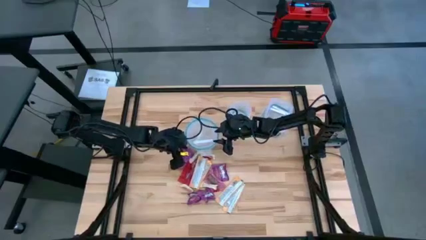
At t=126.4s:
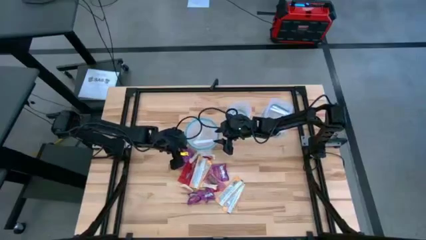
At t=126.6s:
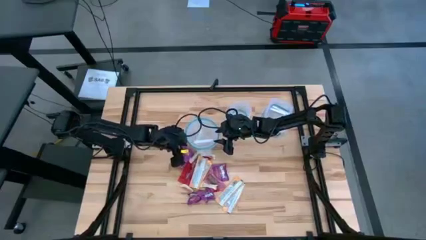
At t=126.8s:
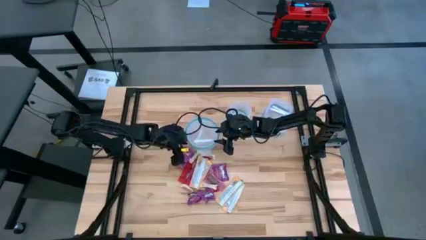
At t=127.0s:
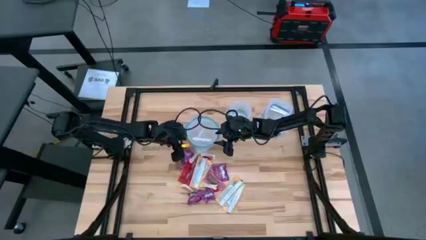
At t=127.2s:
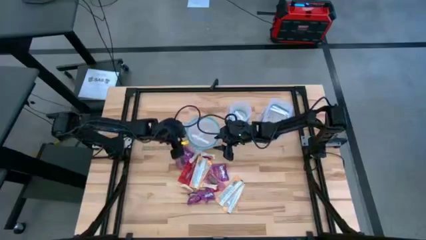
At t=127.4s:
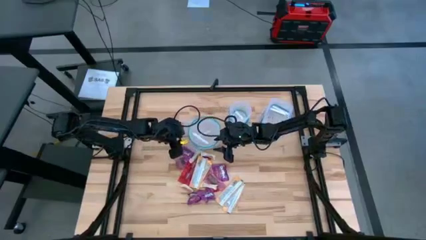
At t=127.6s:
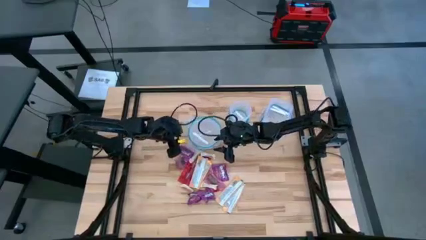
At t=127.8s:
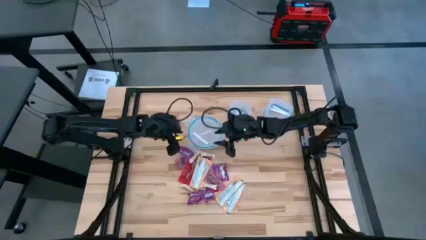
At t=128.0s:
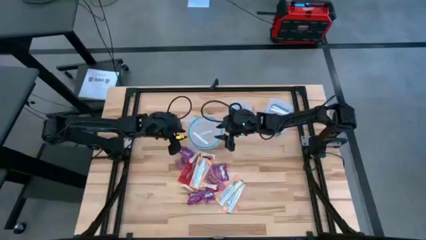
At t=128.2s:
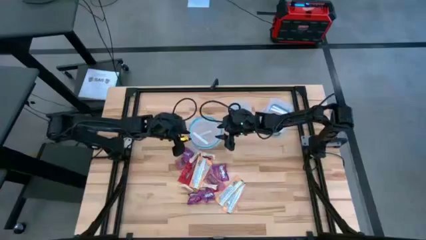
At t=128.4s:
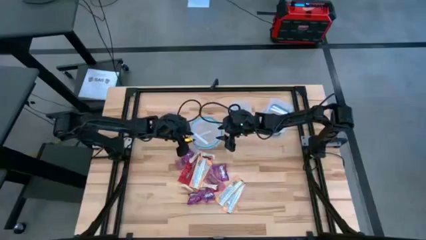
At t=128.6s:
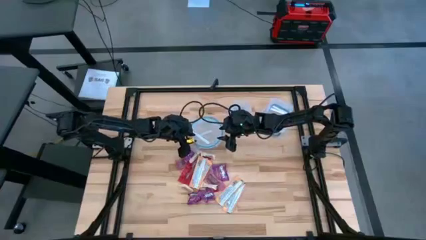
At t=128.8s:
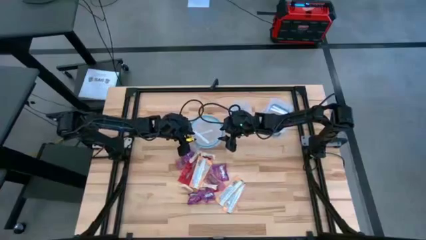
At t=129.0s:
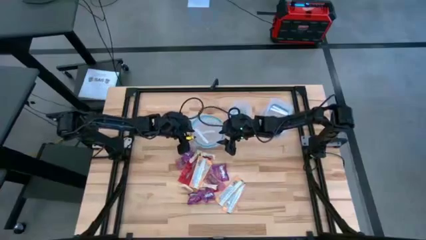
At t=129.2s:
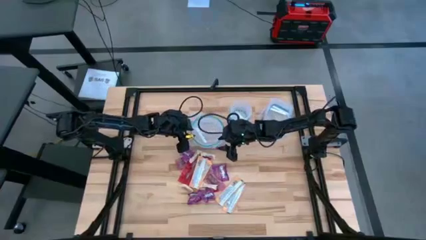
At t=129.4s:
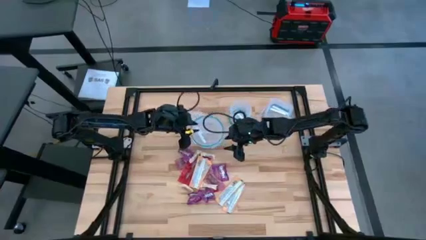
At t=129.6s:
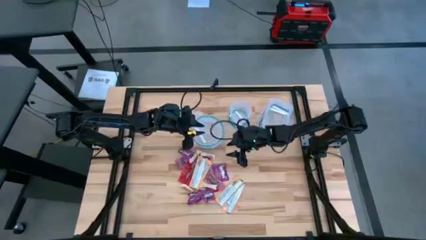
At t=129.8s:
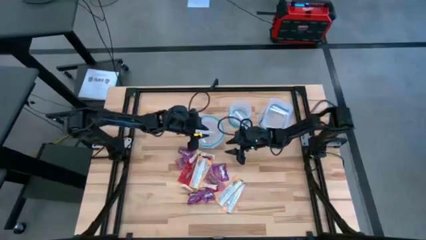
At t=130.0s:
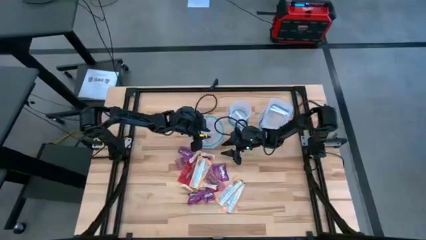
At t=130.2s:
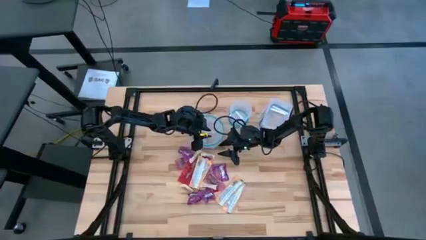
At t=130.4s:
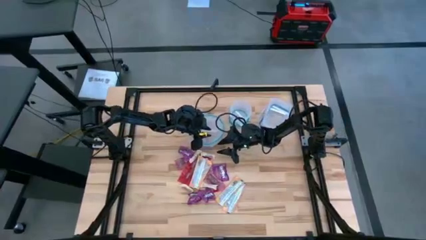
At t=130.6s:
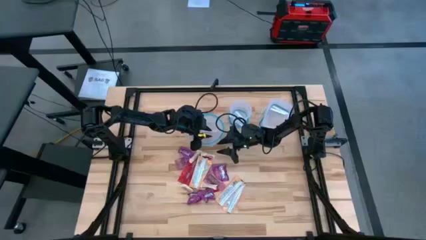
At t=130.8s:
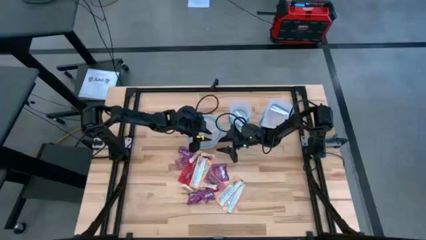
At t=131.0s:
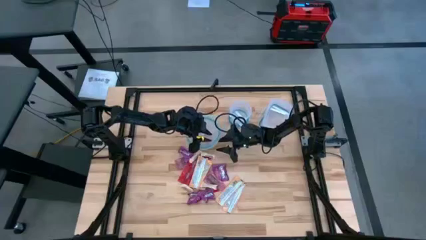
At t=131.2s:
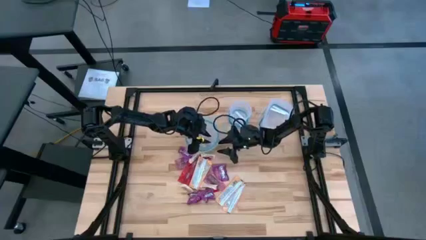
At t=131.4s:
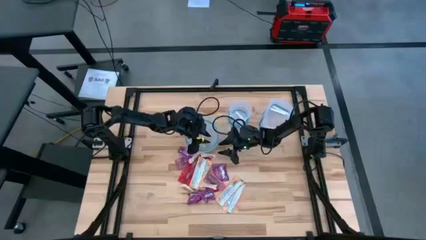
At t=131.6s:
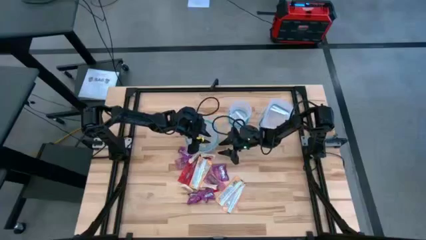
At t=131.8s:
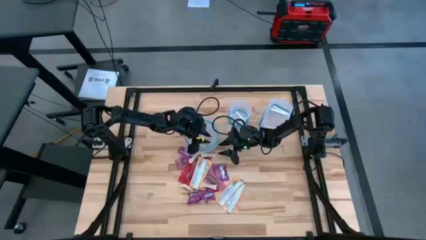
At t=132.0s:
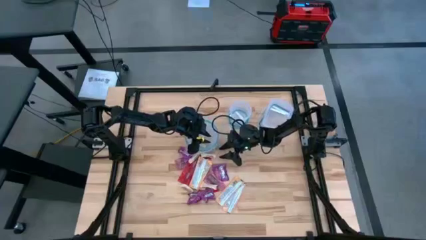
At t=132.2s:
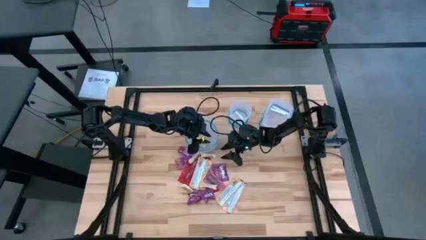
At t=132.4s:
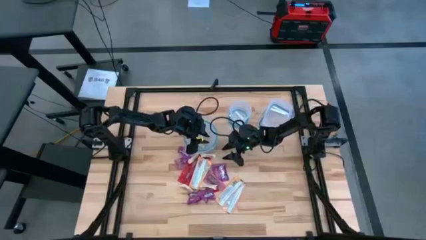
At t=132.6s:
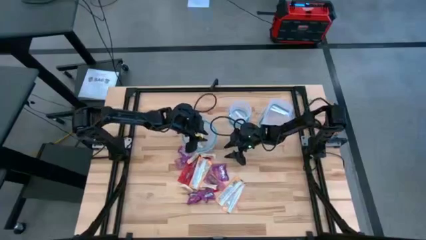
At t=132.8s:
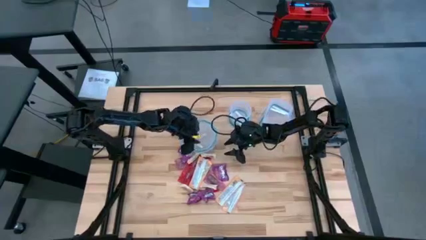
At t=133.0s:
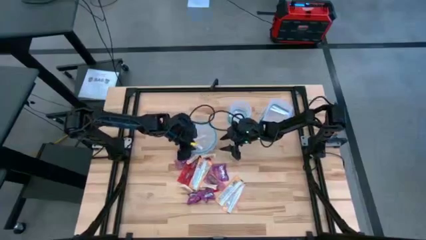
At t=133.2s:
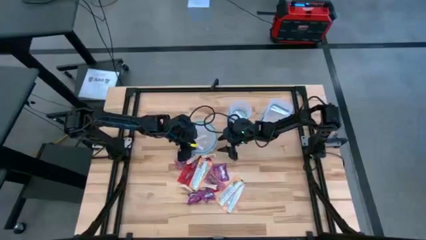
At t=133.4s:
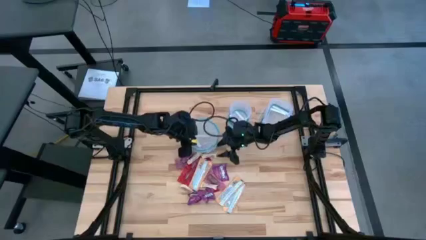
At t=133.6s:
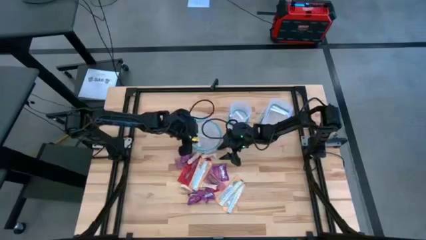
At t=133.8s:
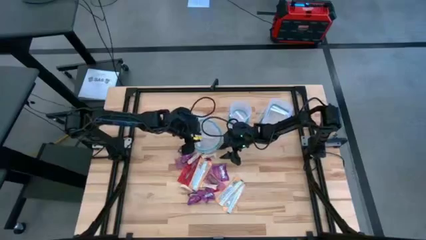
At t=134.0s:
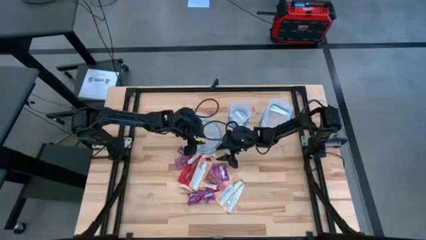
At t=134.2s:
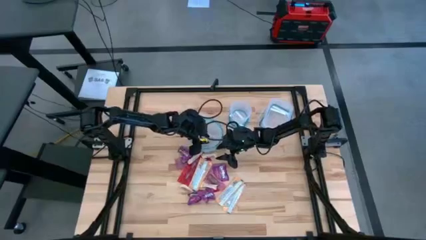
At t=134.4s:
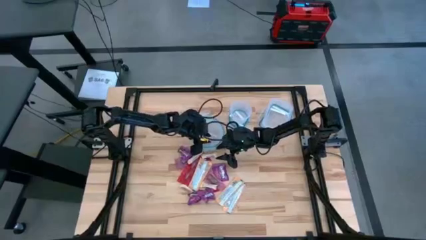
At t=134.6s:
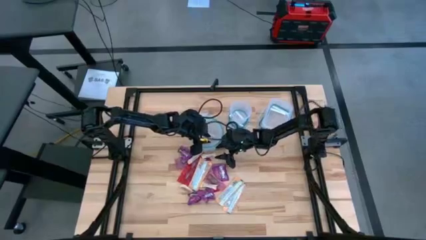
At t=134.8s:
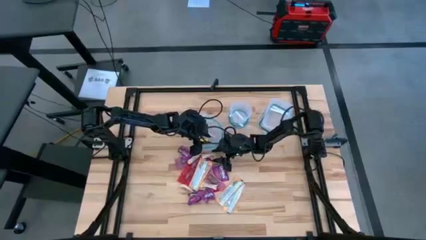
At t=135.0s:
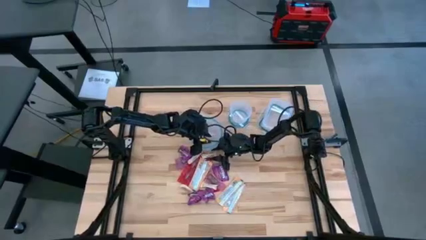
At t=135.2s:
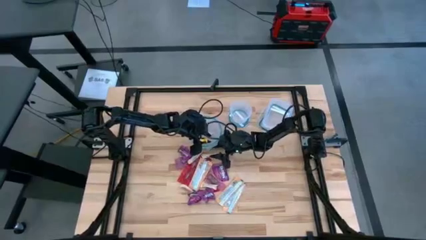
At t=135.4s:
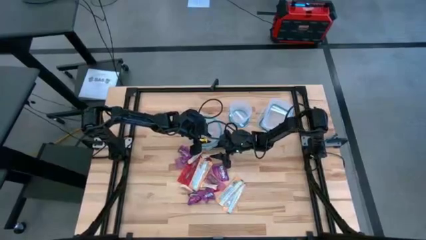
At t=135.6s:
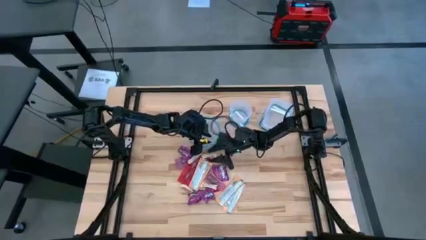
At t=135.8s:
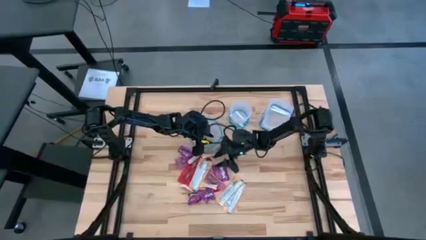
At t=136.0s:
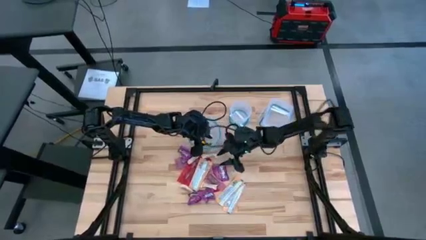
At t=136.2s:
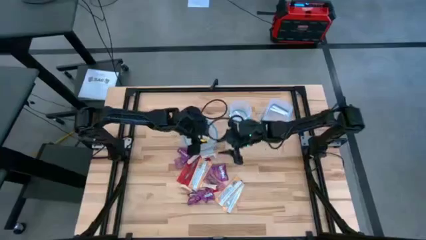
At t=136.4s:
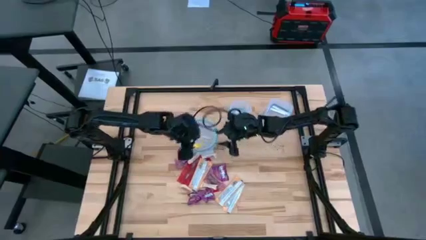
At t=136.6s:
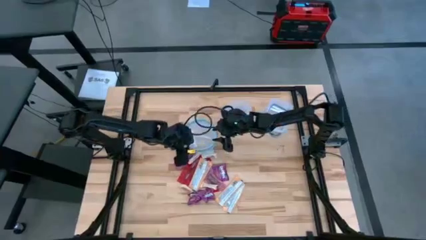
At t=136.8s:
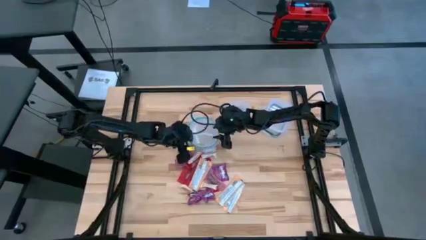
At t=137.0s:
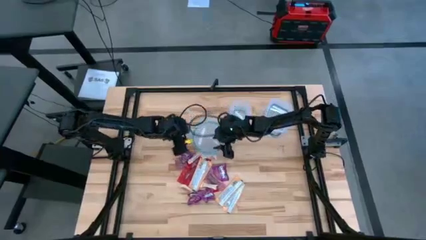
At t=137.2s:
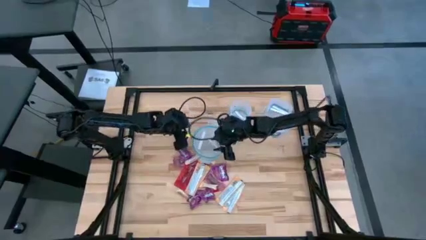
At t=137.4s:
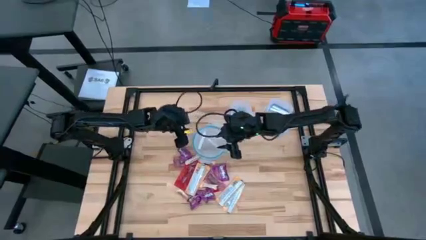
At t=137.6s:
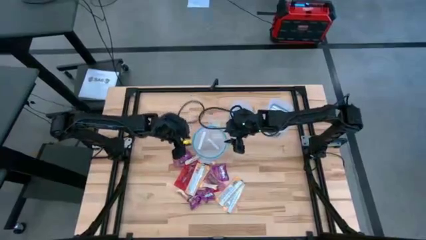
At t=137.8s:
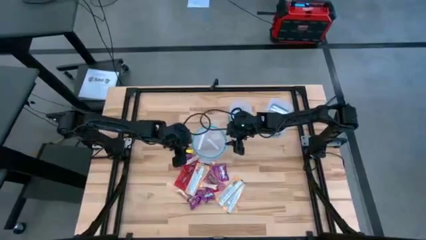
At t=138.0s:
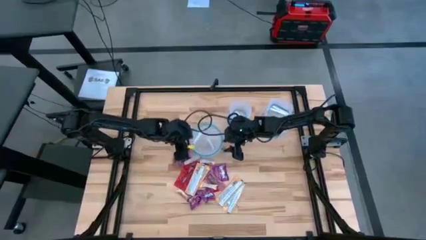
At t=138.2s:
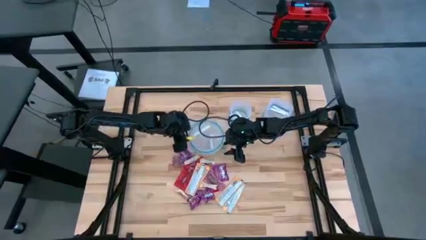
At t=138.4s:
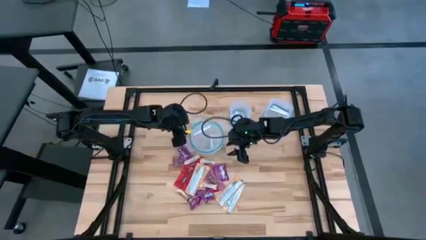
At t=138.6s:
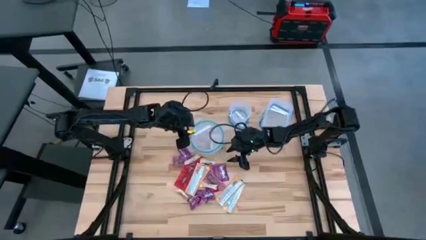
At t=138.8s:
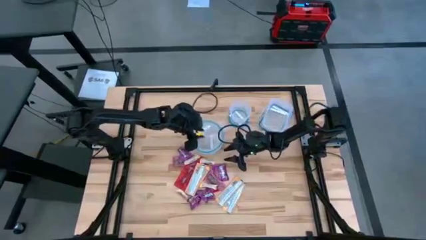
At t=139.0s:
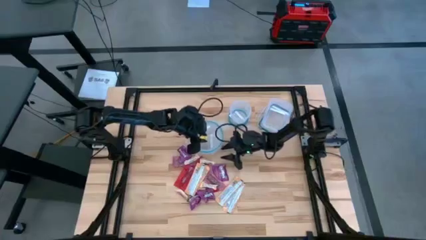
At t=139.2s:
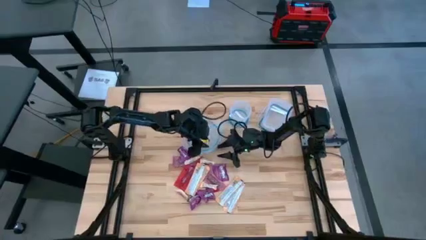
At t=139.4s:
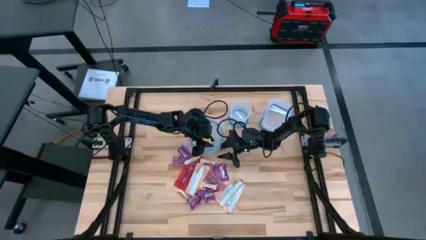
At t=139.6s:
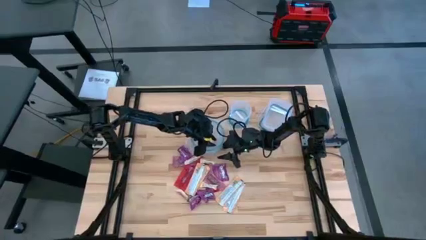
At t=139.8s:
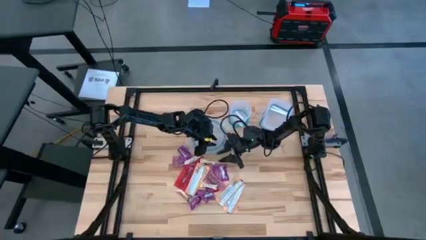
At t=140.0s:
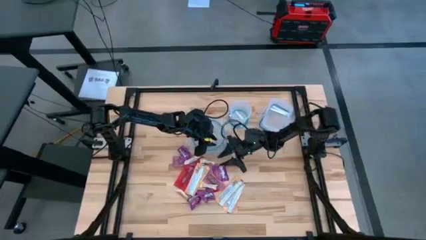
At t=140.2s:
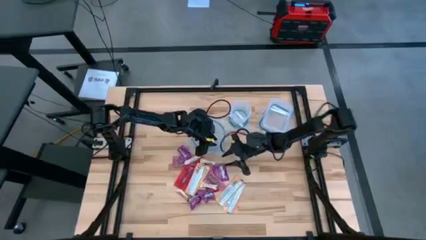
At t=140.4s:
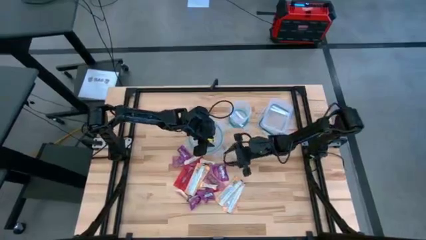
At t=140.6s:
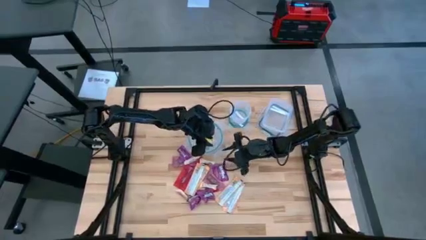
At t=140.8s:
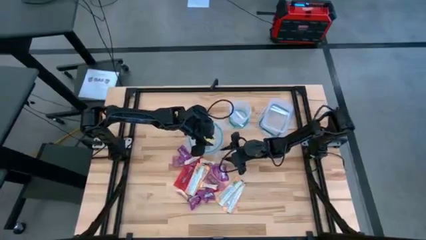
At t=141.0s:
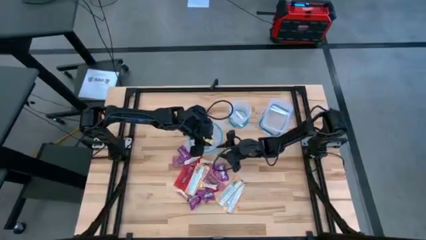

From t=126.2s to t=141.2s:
Task: Sort candy
Open the big round transparent bin
